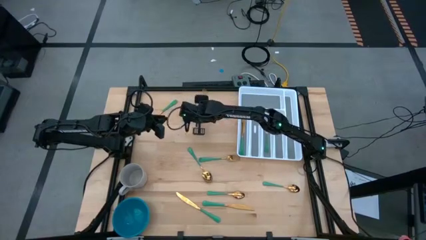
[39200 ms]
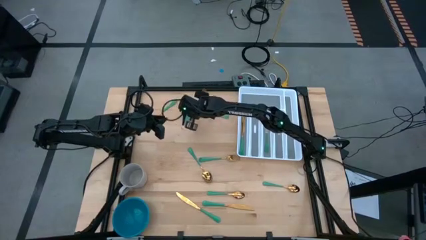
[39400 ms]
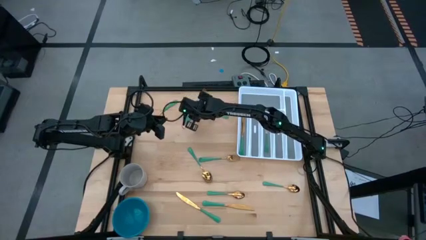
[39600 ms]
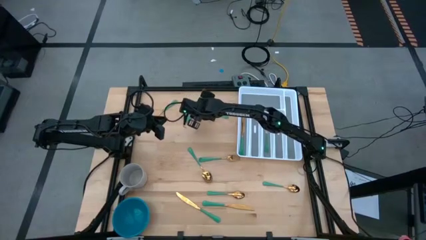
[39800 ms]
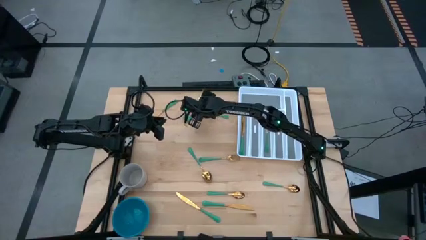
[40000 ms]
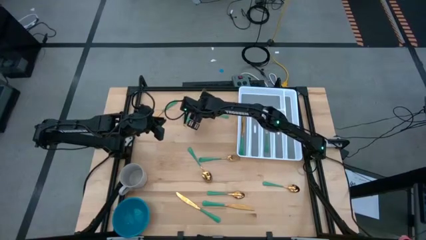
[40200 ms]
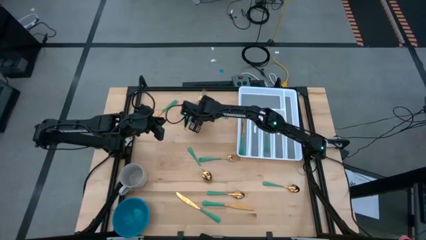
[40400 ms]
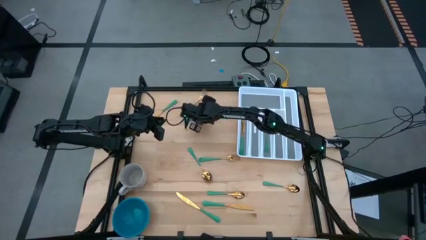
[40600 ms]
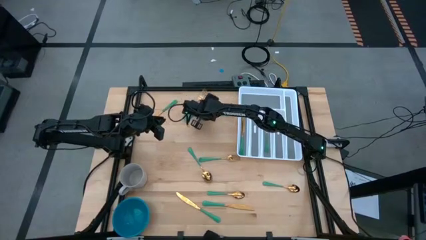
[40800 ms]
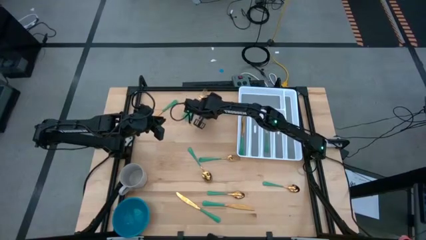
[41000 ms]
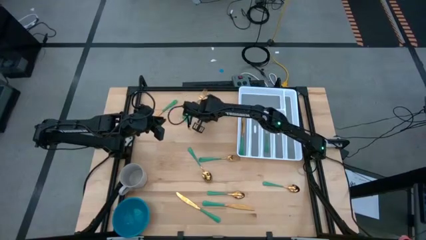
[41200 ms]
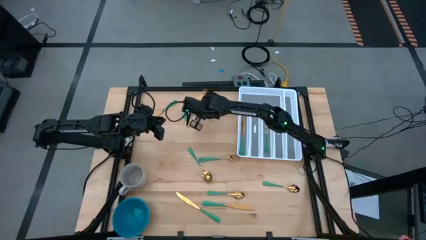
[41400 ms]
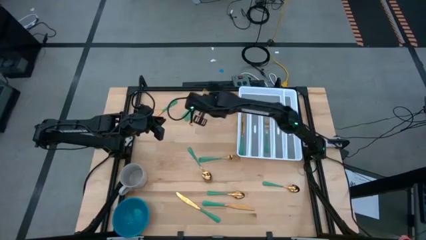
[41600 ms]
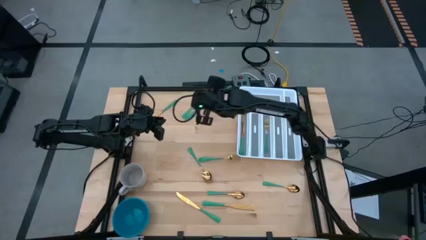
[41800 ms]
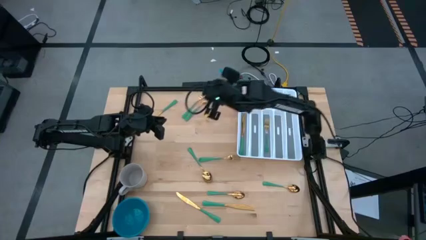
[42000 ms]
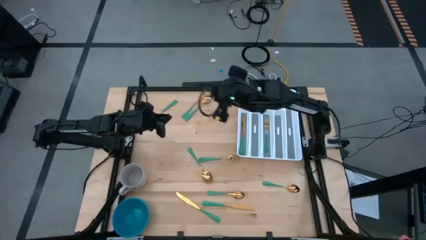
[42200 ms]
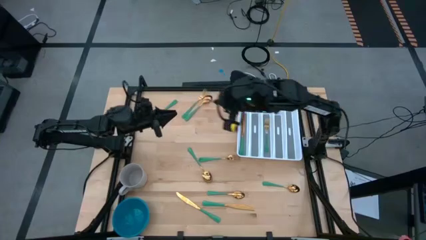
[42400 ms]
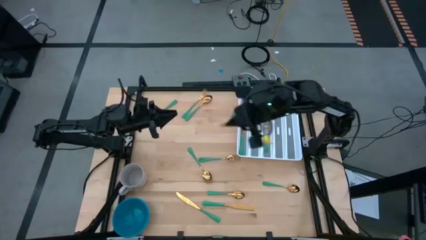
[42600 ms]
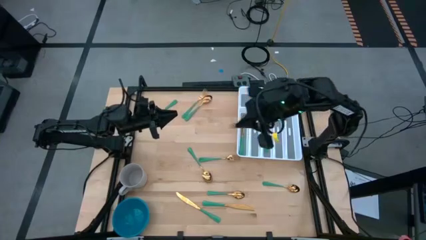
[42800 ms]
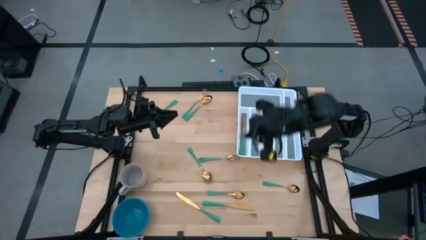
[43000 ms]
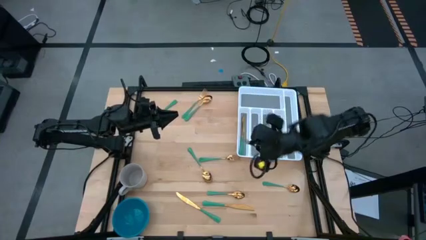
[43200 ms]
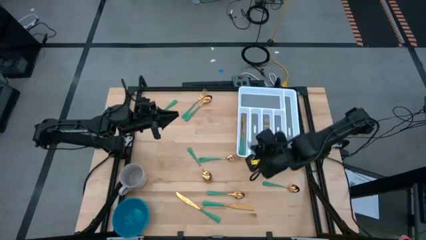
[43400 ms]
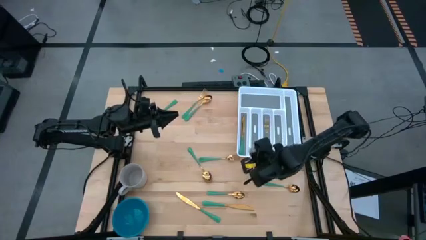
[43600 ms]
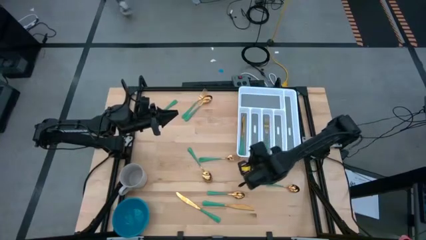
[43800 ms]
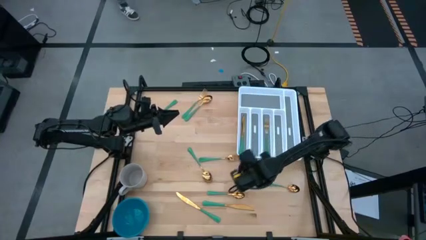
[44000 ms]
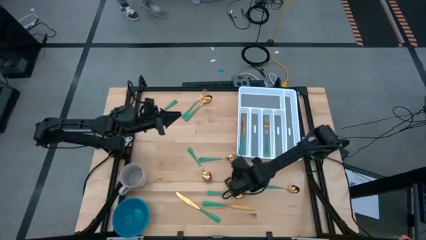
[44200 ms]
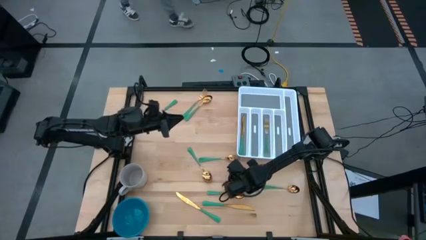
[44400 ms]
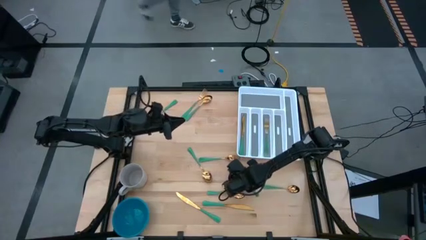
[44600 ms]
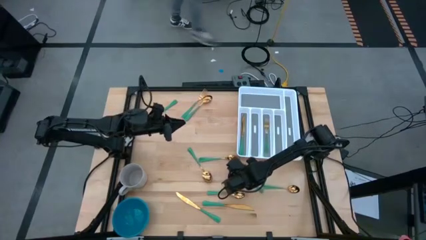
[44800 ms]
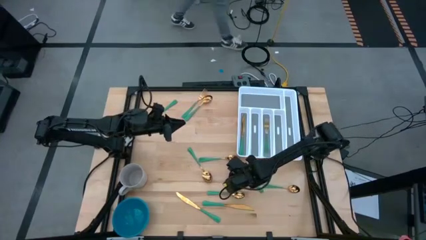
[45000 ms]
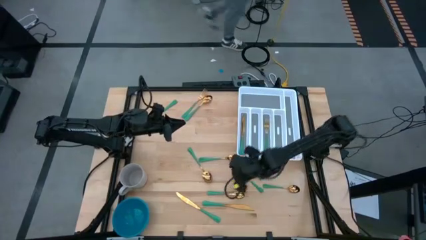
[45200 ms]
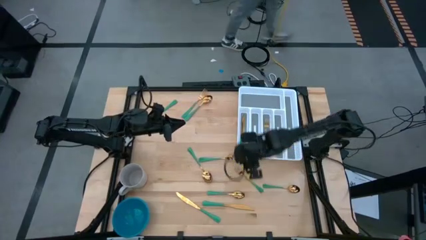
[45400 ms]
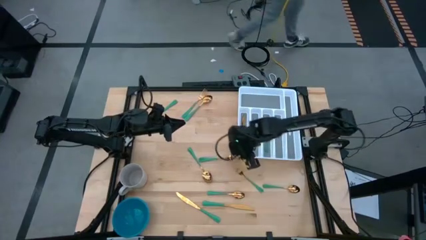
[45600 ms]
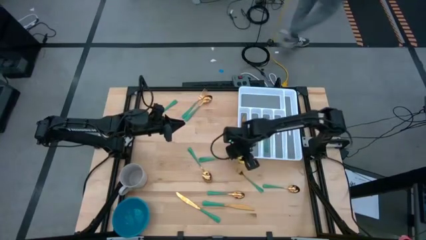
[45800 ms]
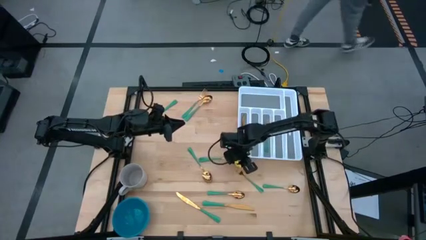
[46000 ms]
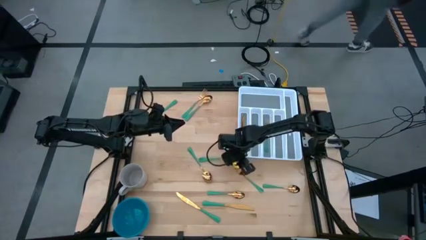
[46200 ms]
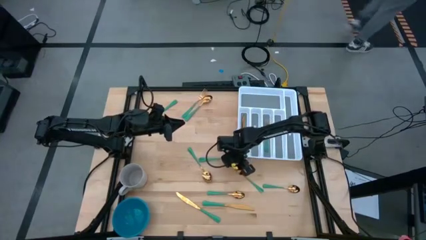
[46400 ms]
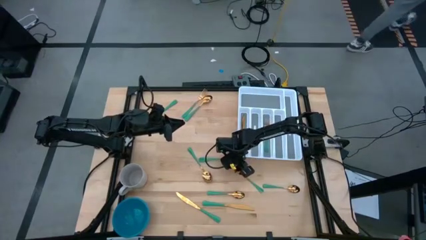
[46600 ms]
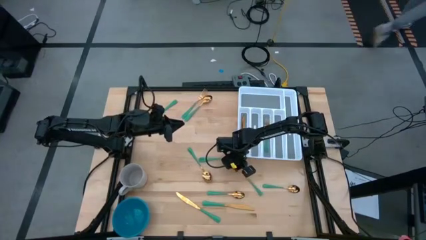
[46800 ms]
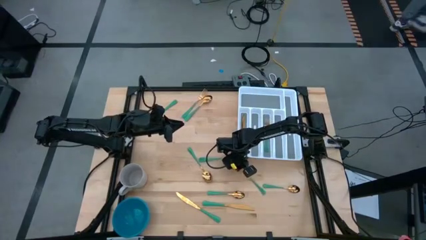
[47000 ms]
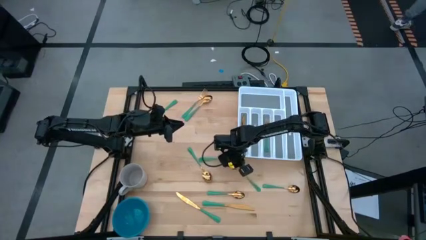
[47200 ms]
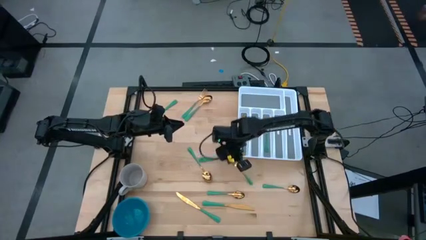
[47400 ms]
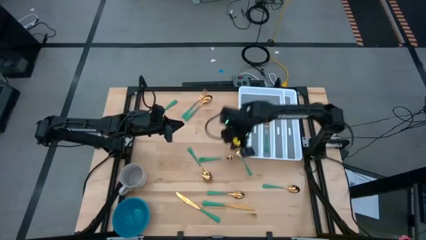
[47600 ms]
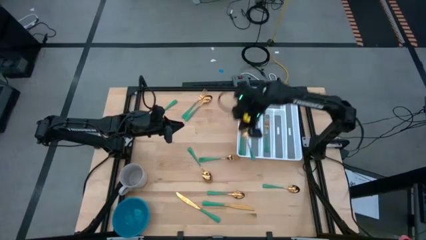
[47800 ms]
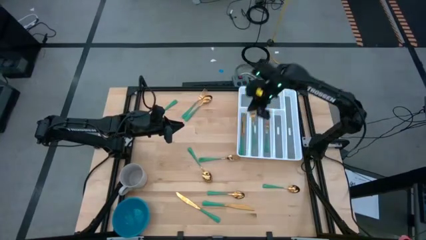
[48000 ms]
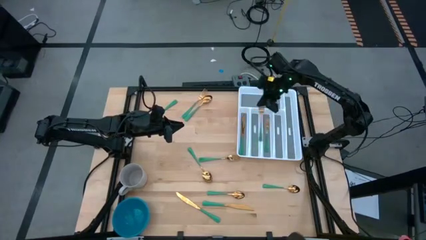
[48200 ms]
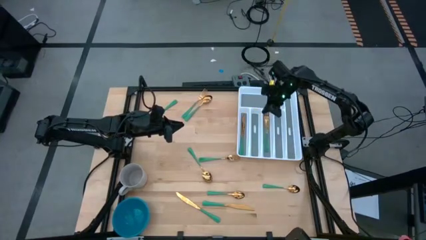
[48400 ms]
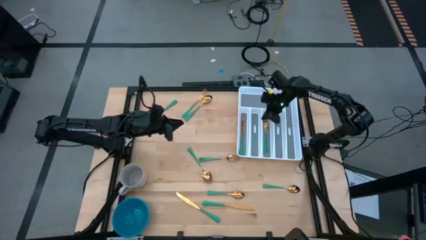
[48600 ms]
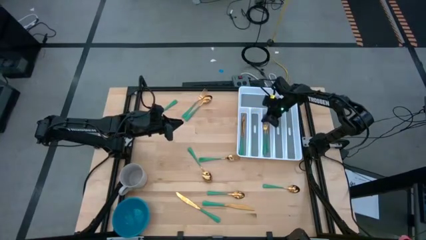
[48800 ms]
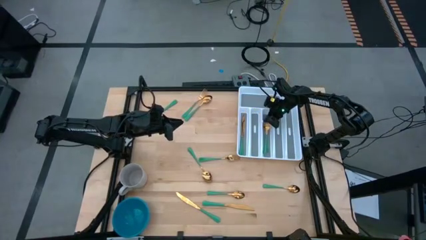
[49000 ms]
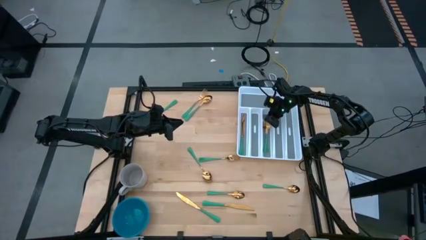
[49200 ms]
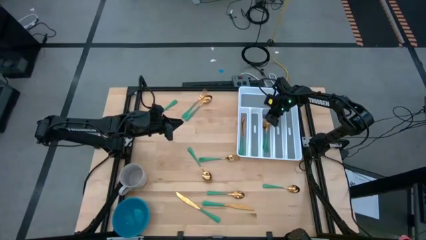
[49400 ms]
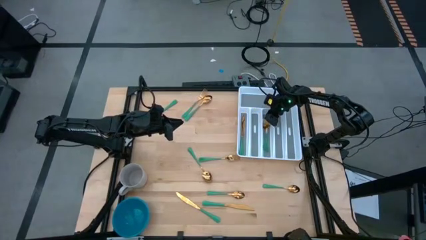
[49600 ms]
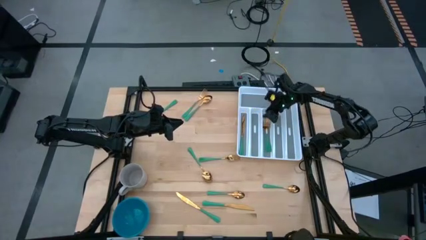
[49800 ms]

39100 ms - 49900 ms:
Task: Sort silverware
Put the top right green fork into the white cutlery tray
